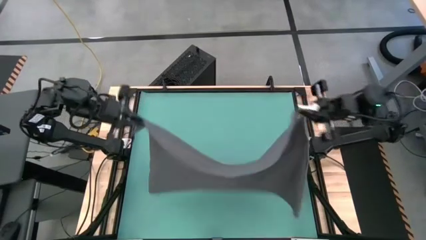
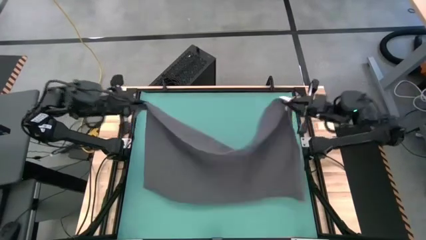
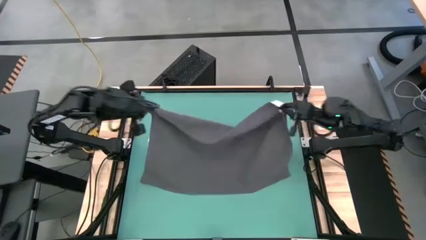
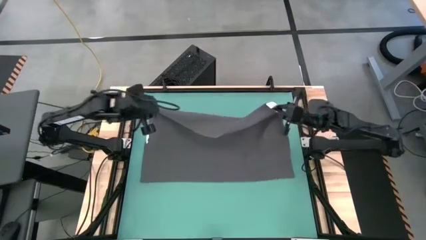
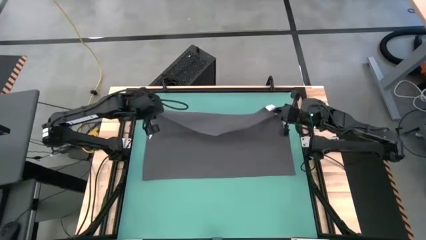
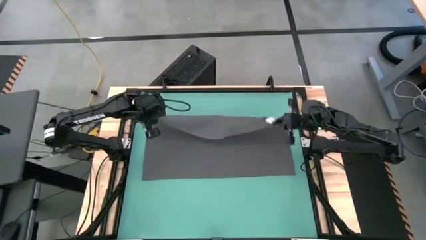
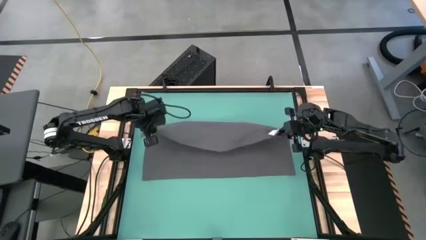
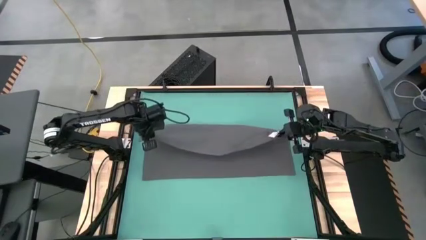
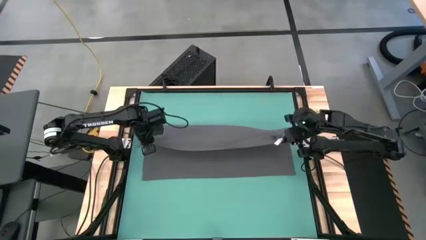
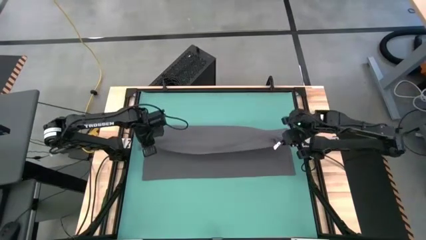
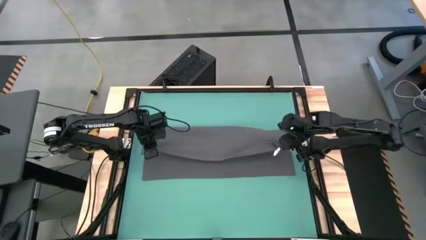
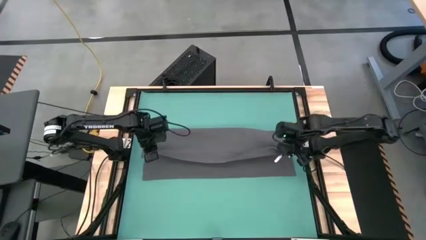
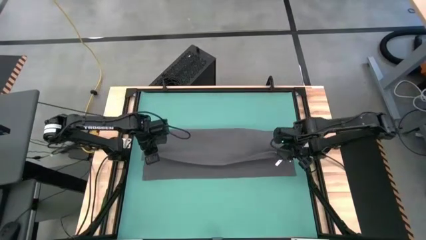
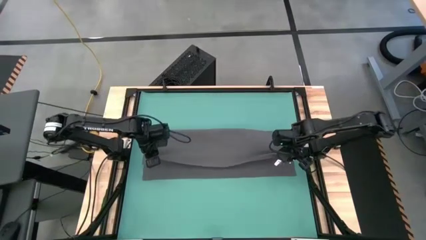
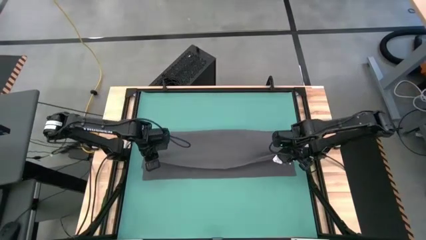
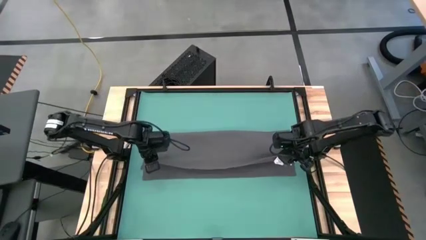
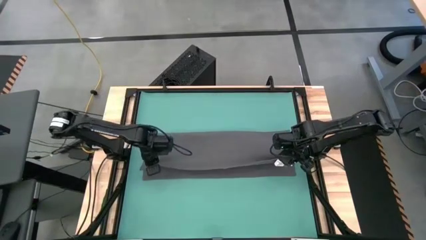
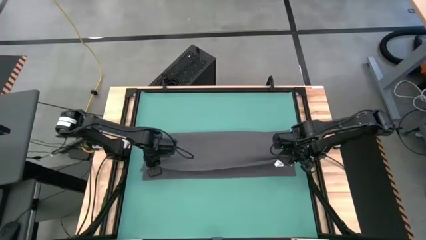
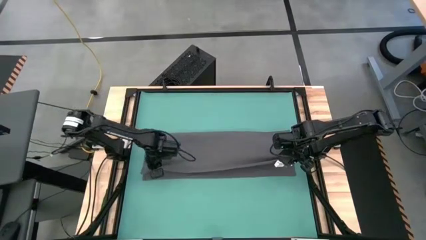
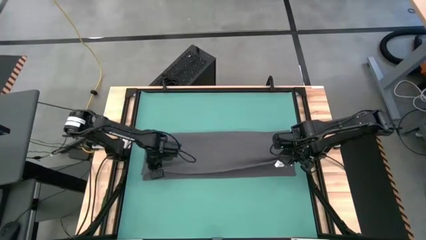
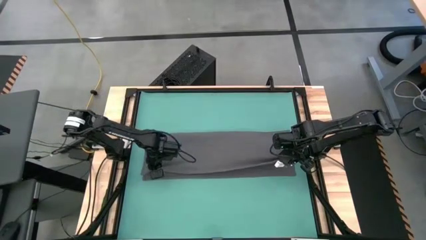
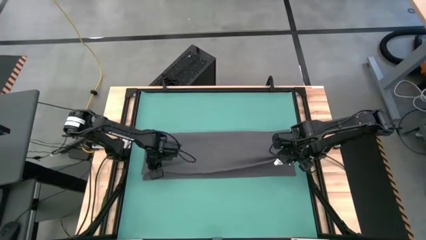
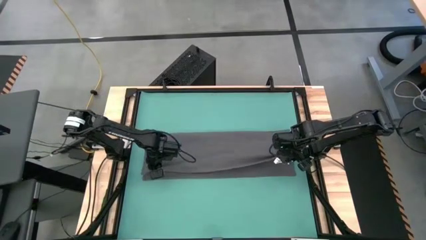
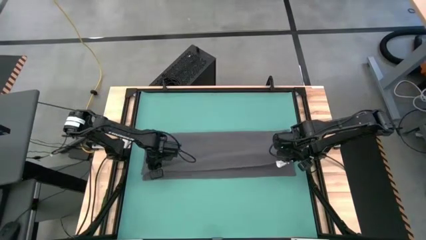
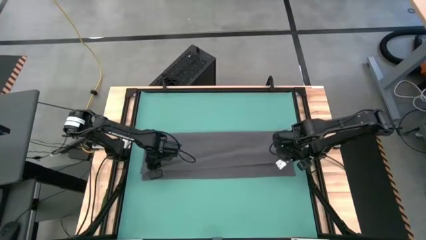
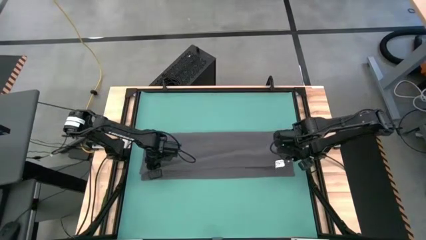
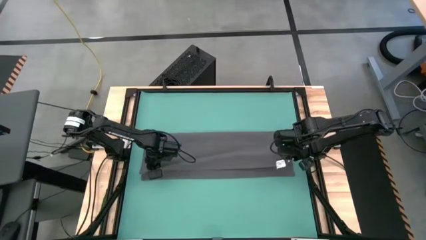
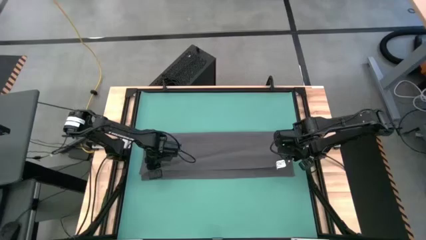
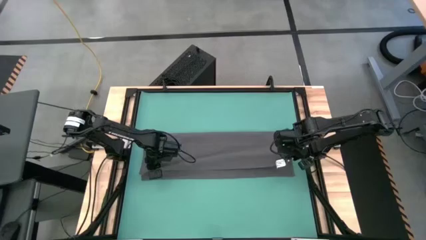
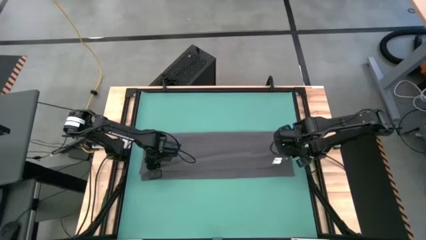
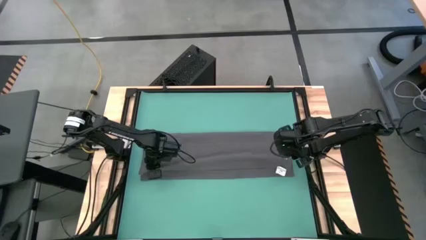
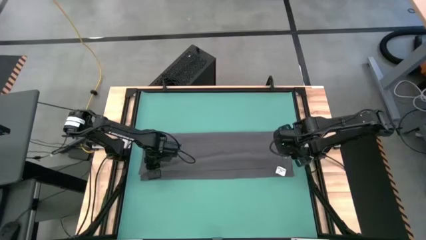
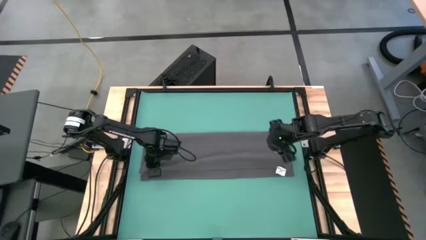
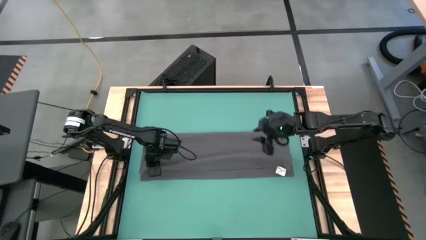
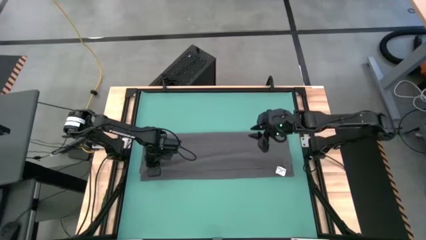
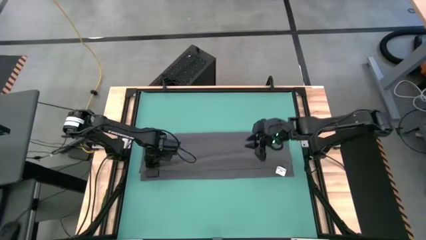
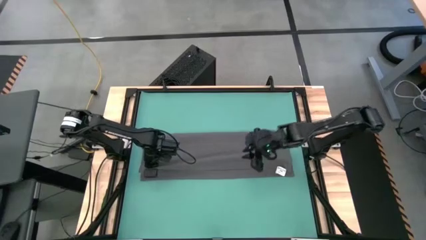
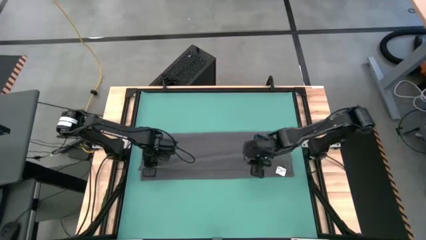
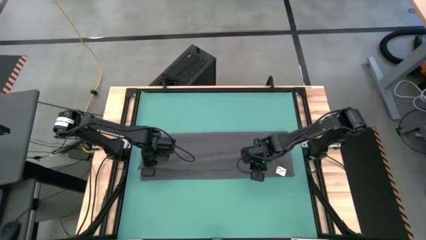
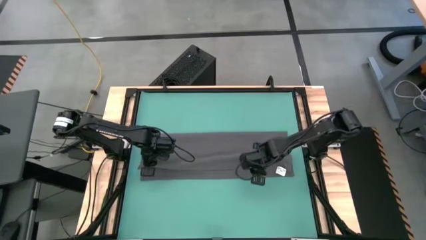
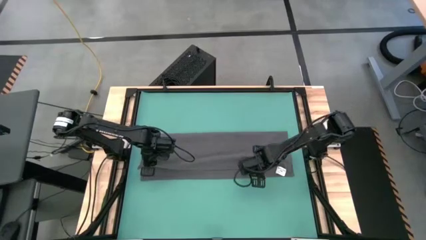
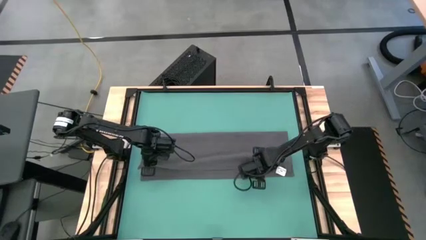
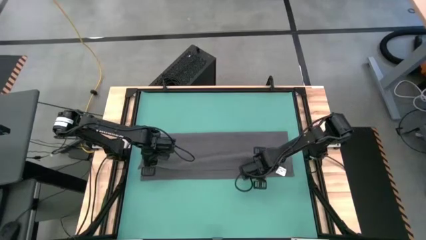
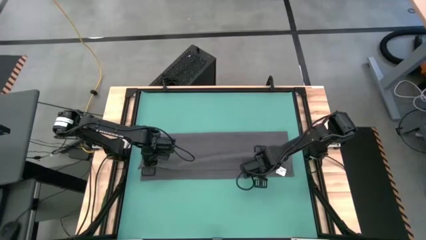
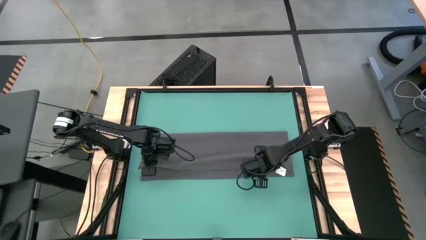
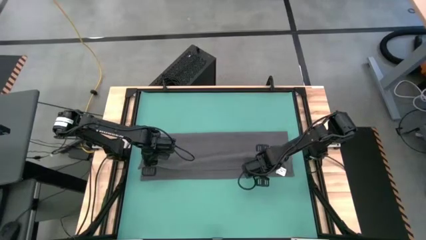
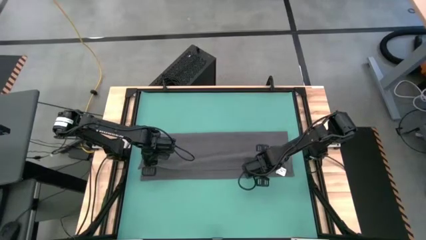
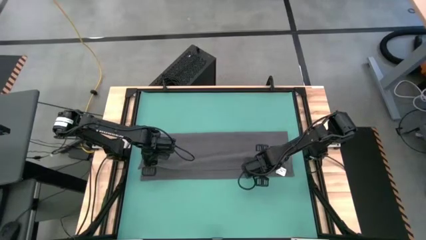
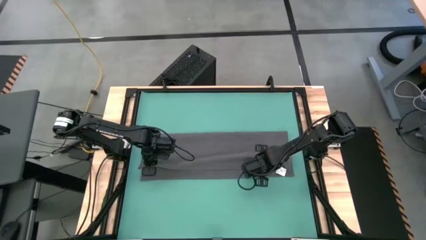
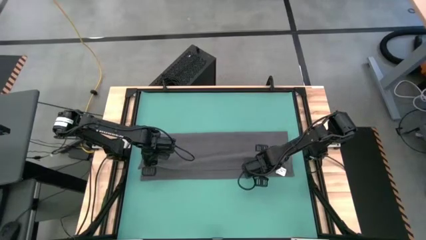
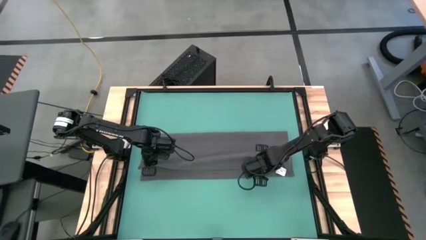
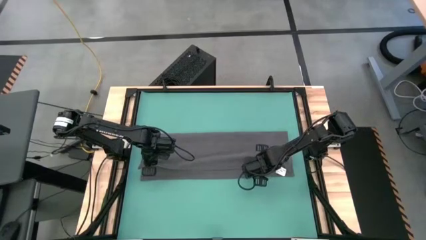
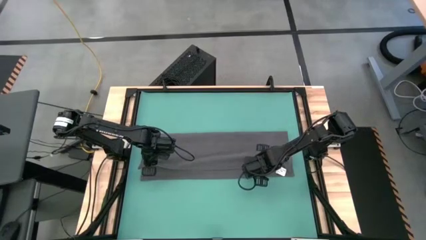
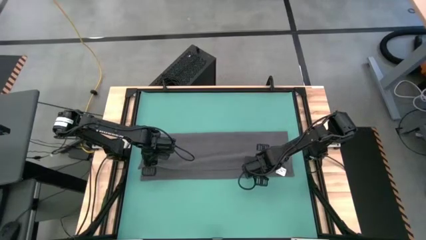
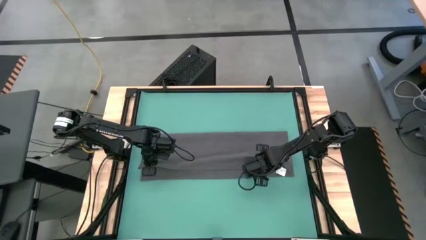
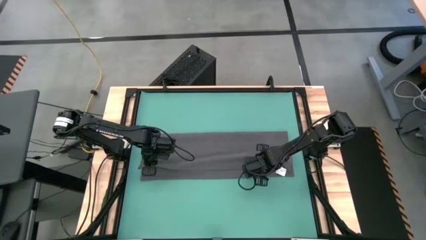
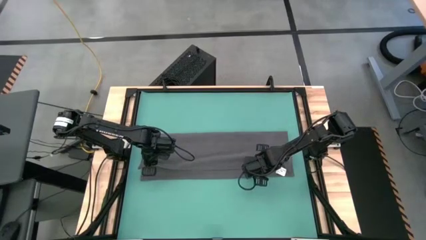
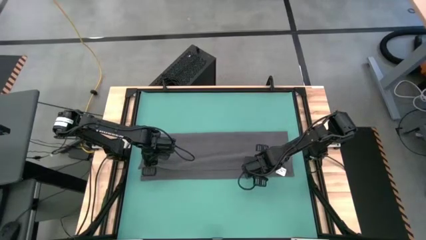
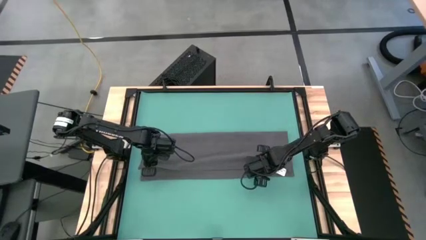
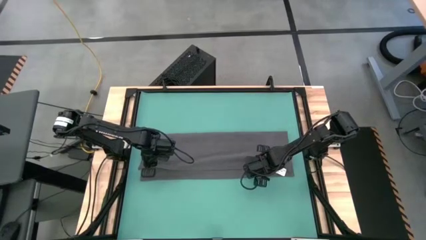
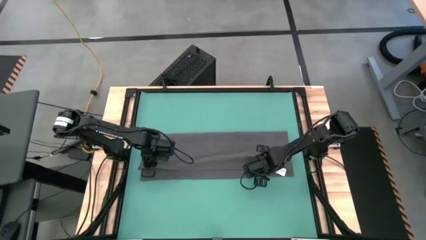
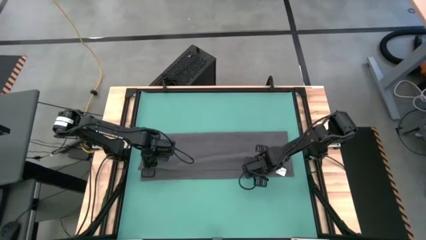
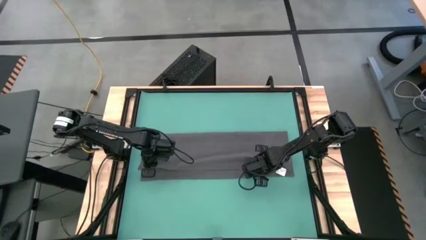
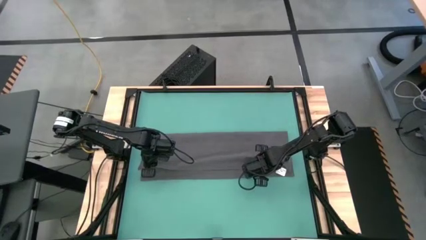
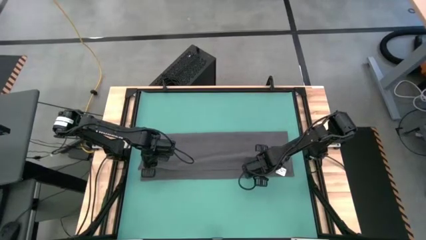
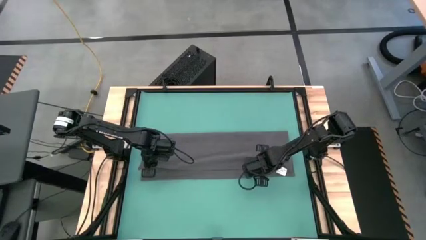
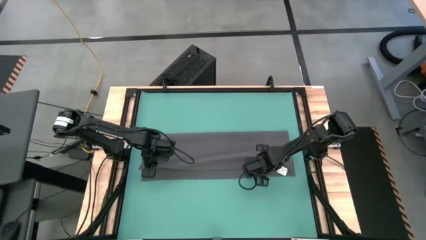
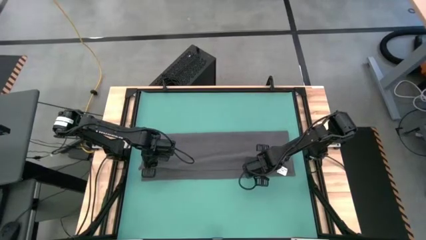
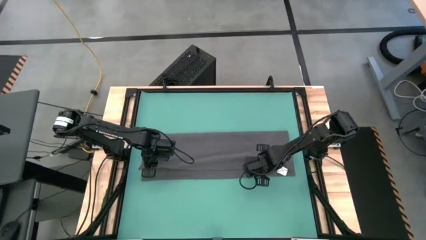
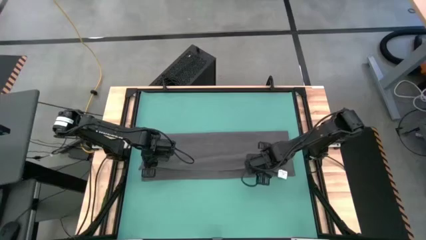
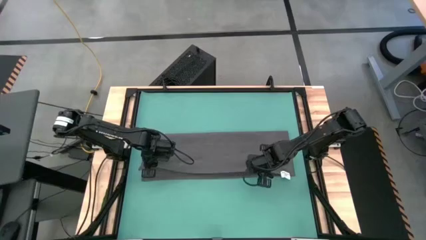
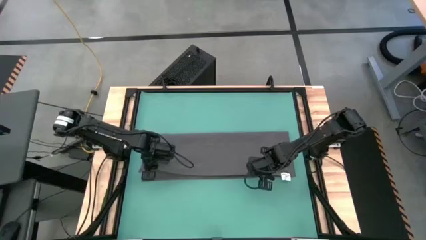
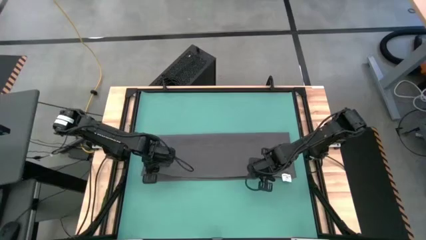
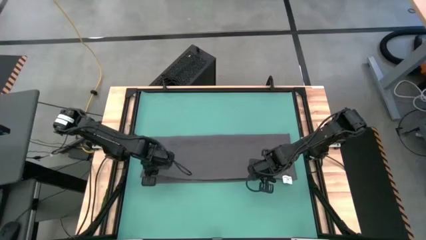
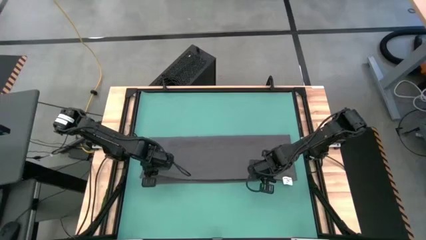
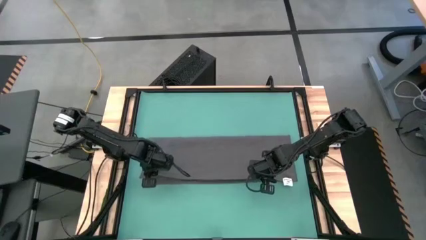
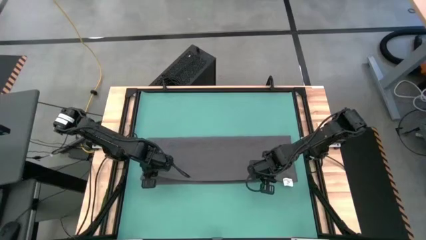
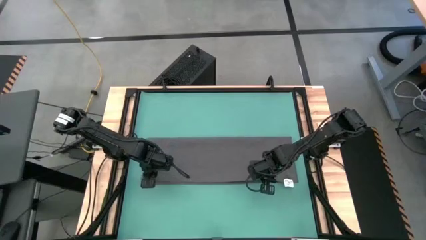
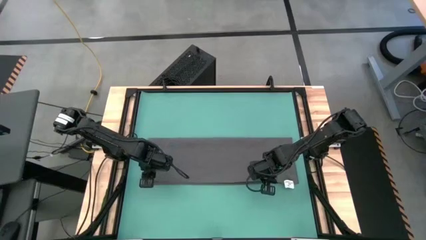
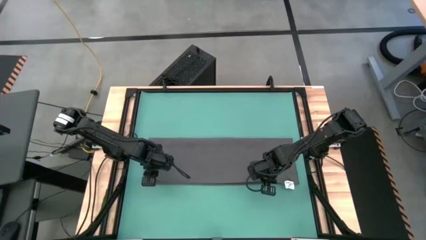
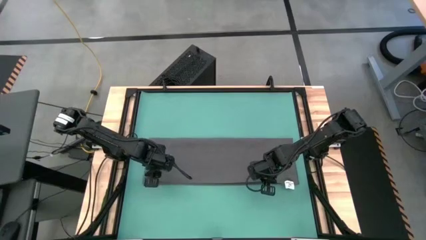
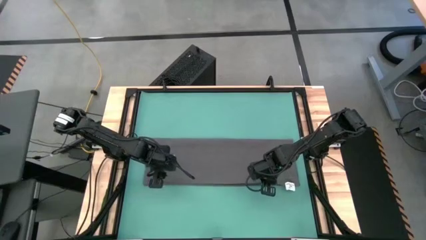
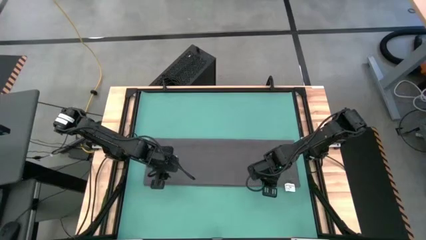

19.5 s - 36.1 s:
Task: Roll towel into tight, uniform cylinder
Fold the gray towel
